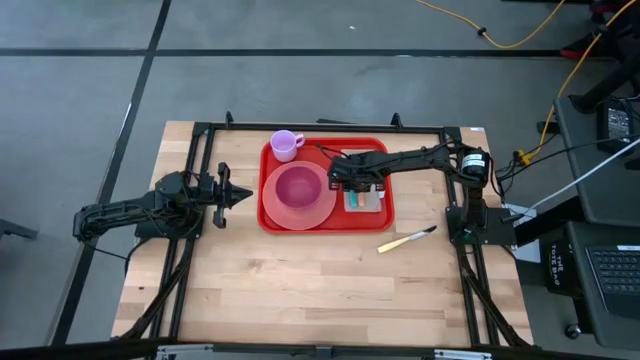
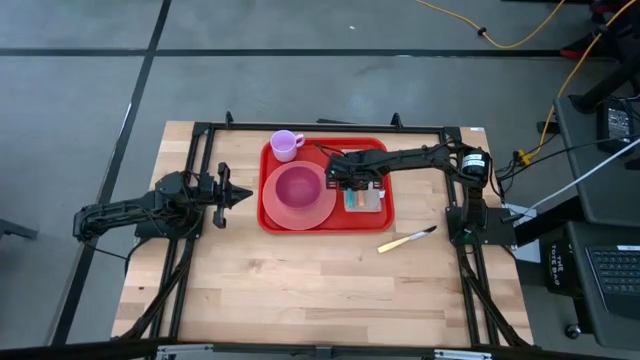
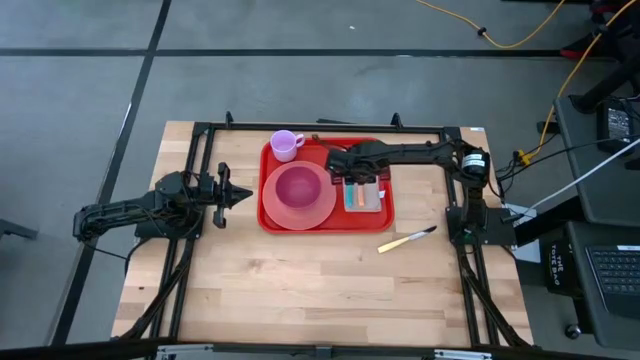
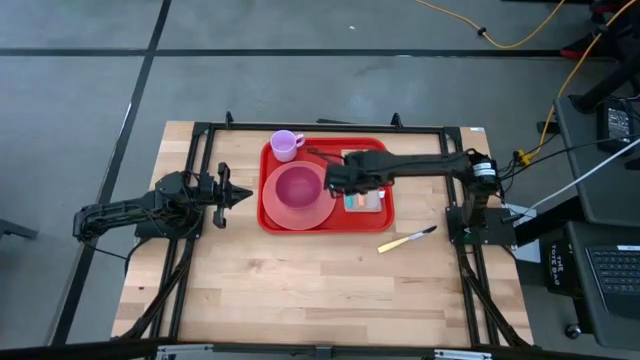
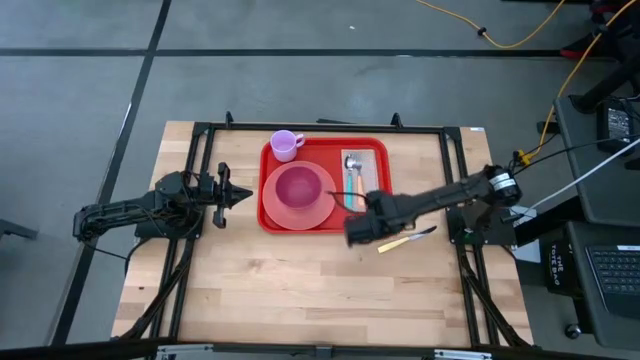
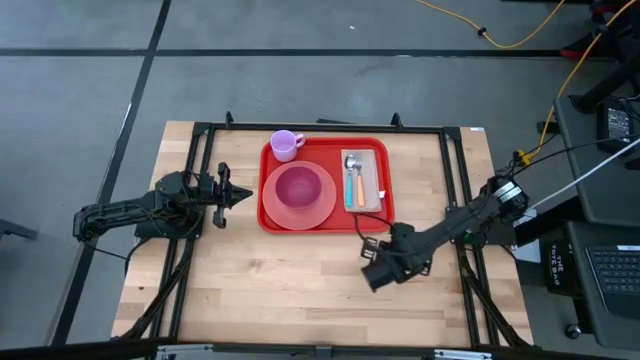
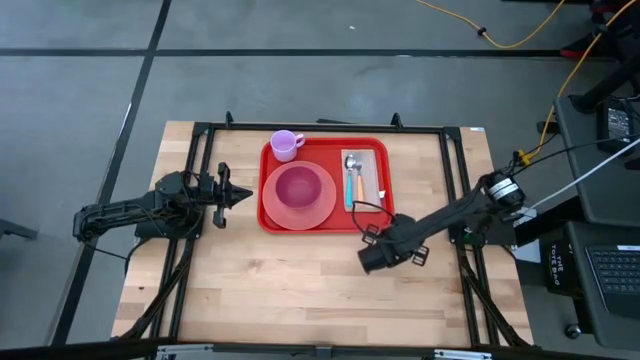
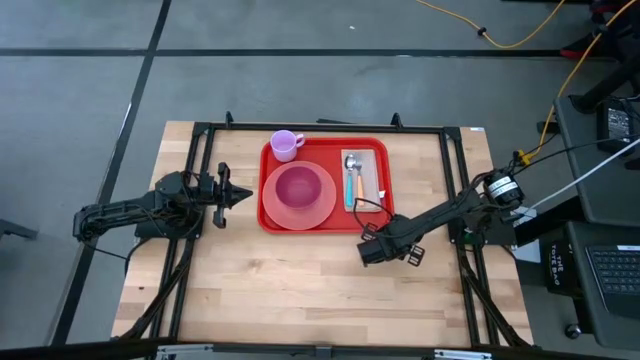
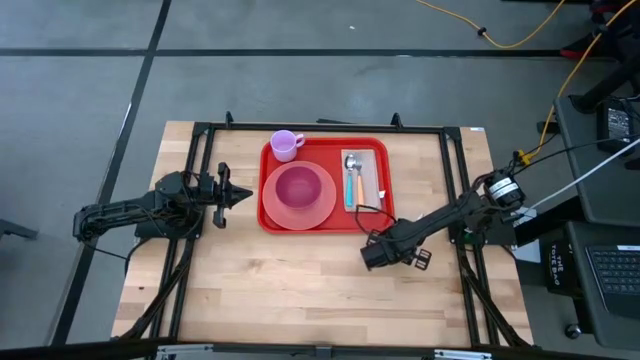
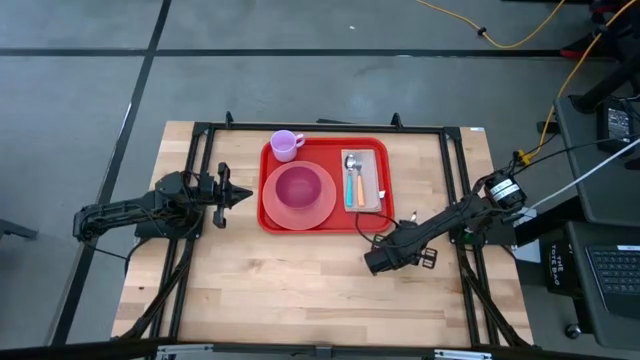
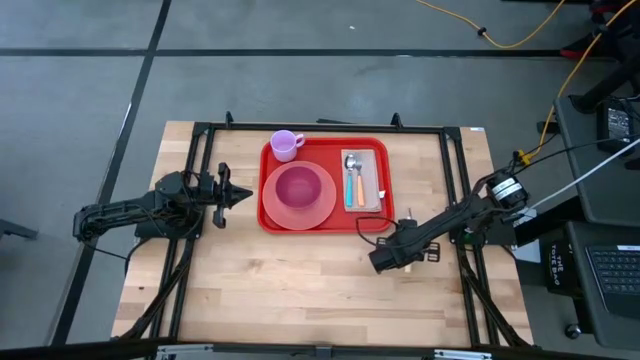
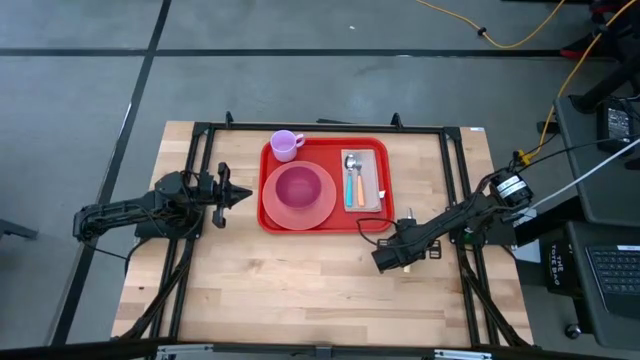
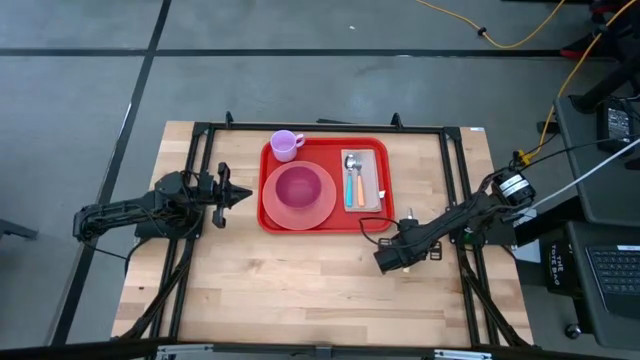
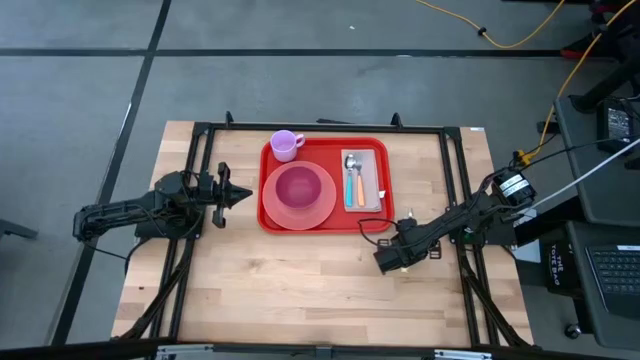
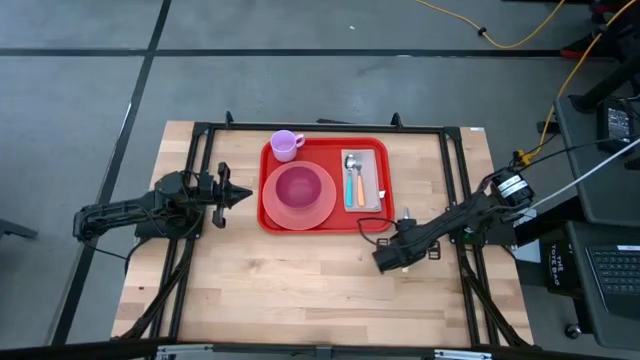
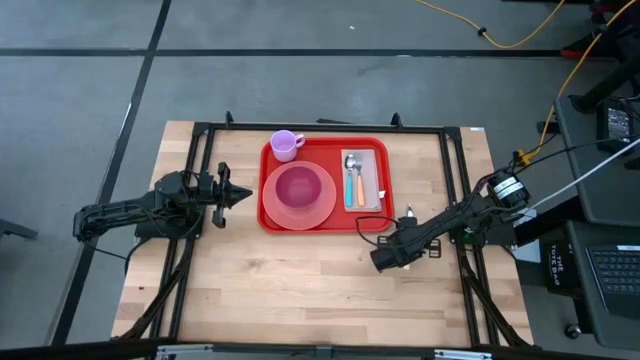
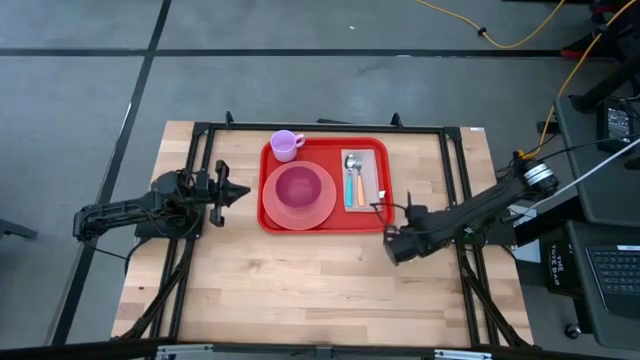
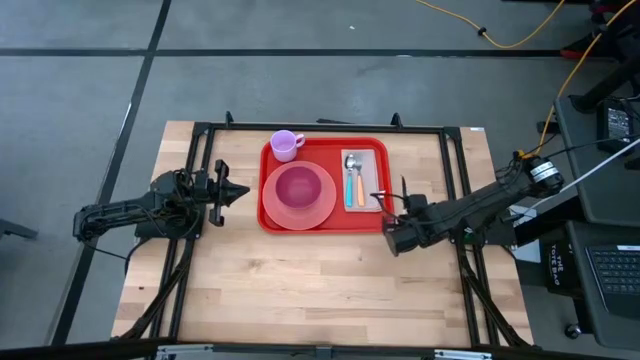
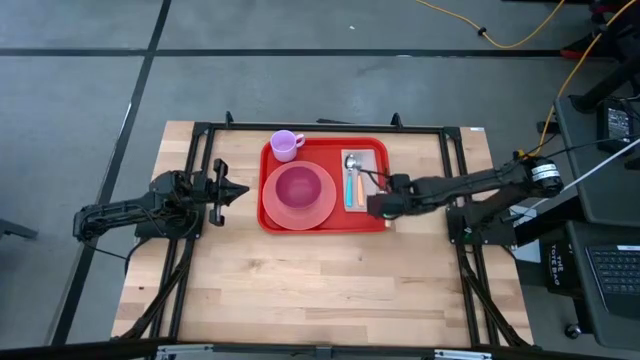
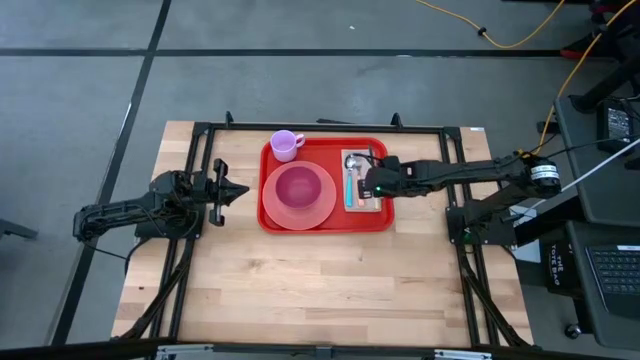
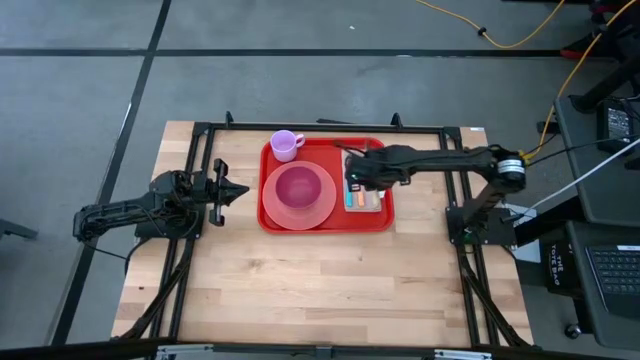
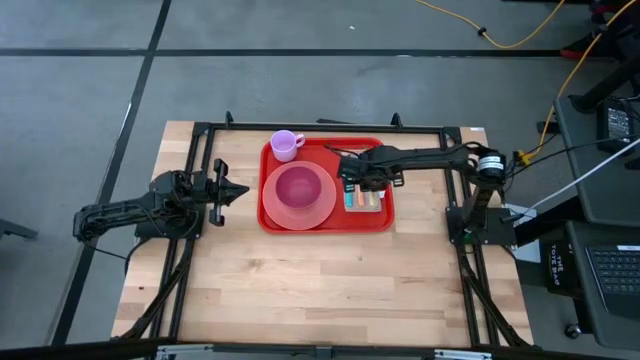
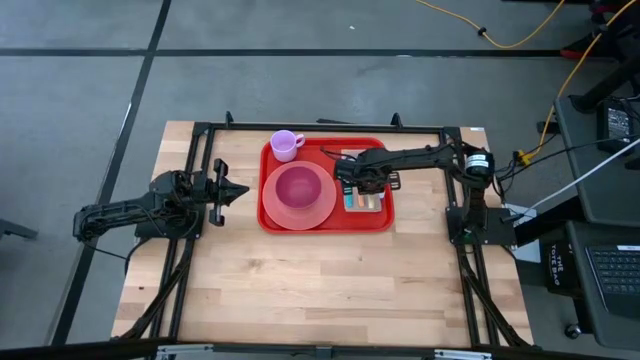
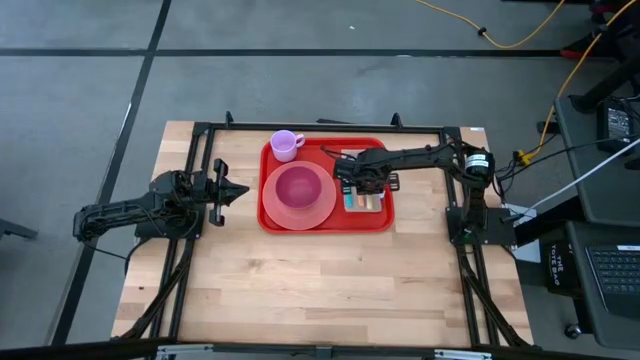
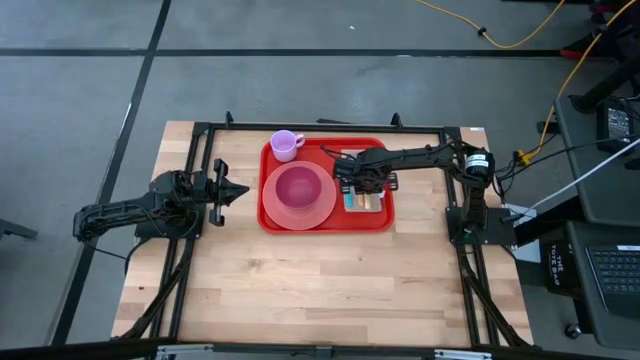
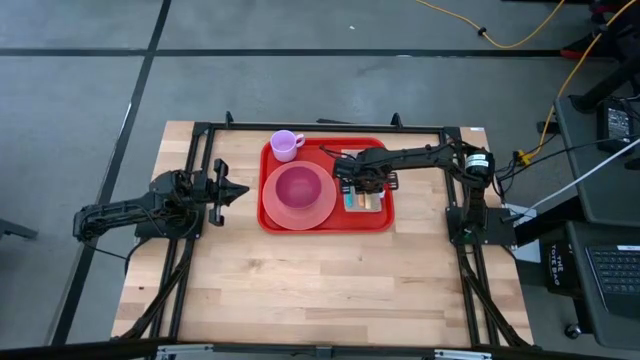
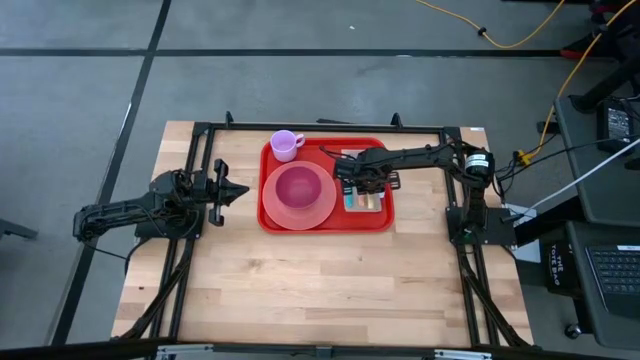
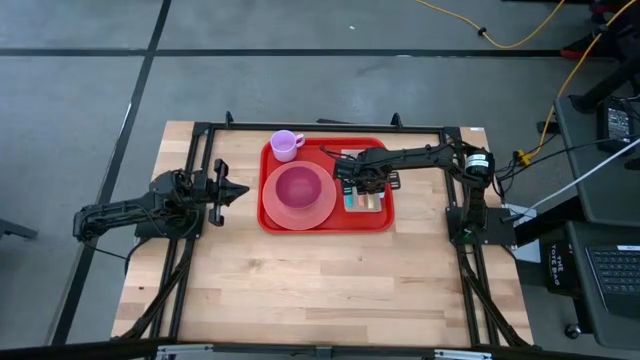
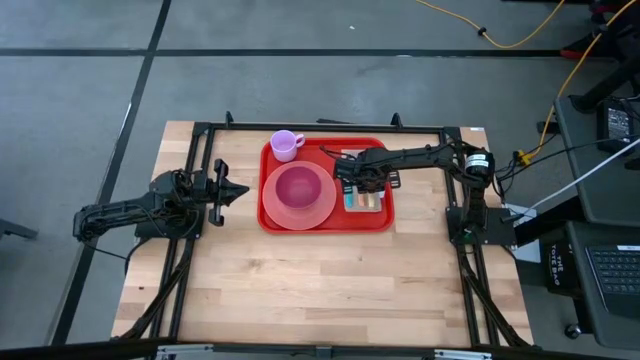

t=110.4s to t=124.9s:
Task: Set up tray
Put the yellow knife on top of the brown napkin on the right side of the orange fork

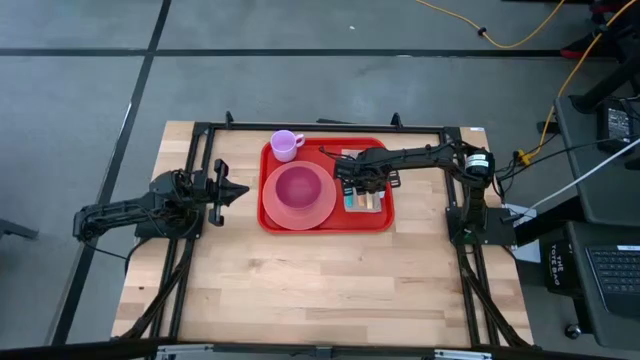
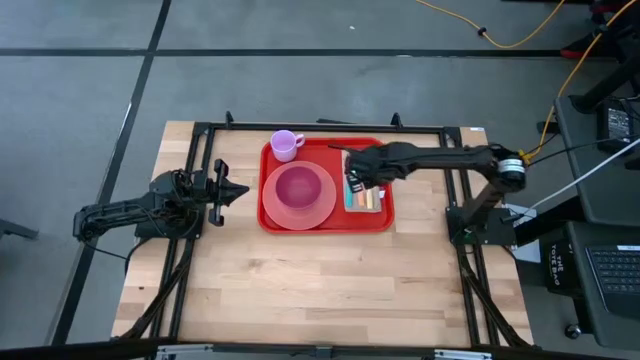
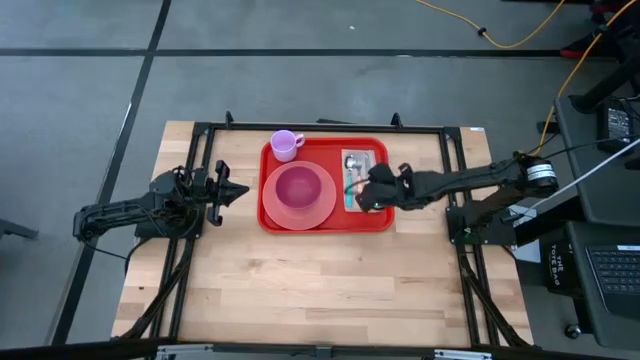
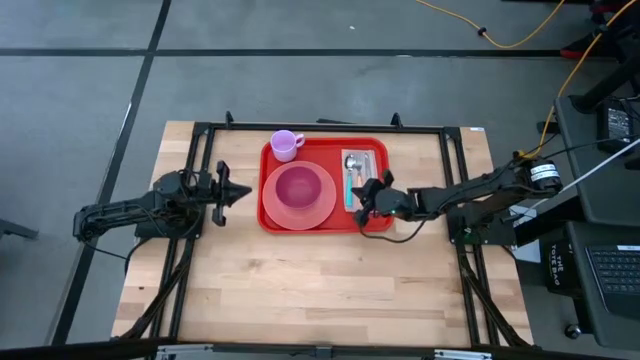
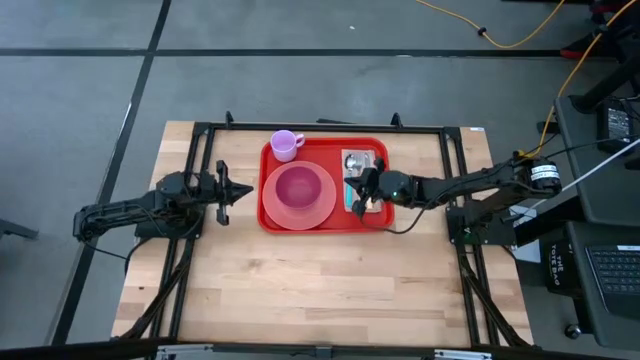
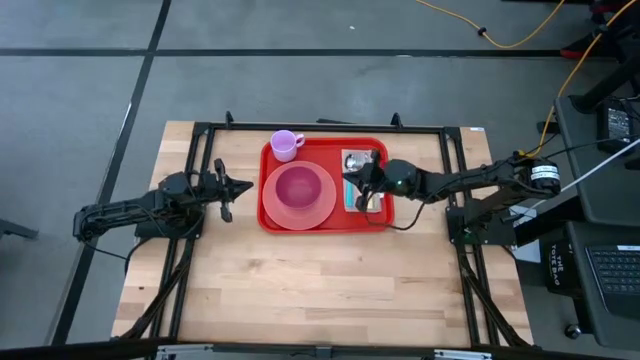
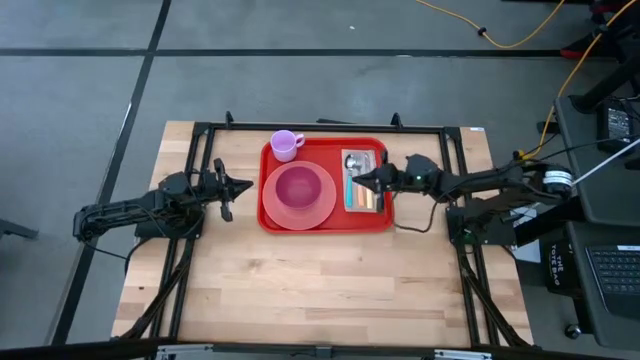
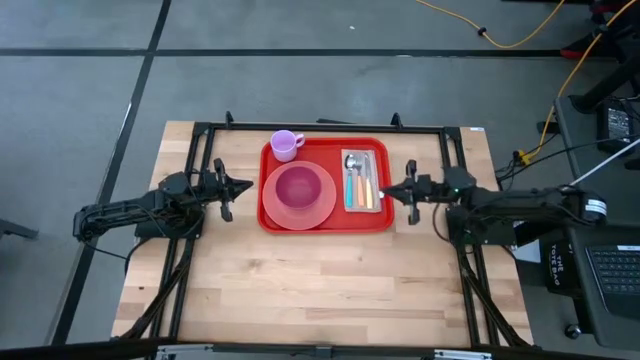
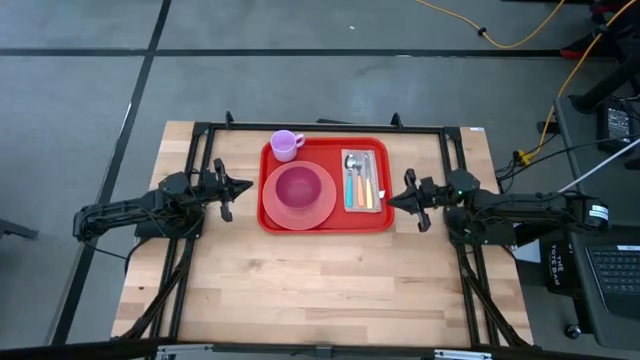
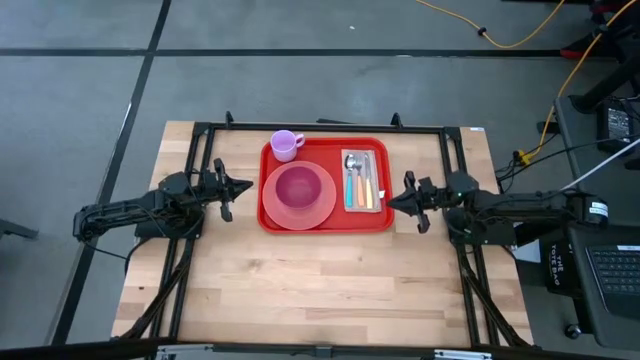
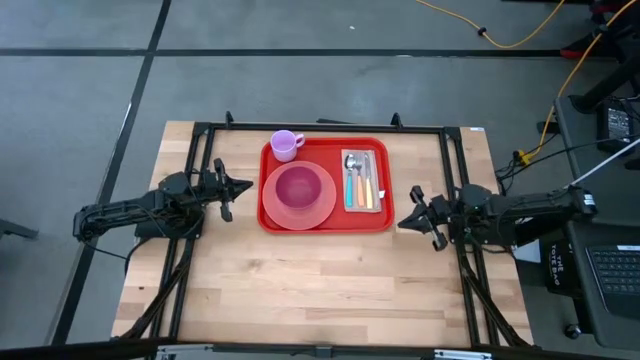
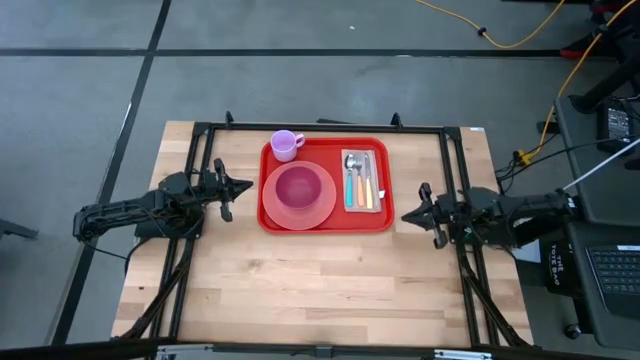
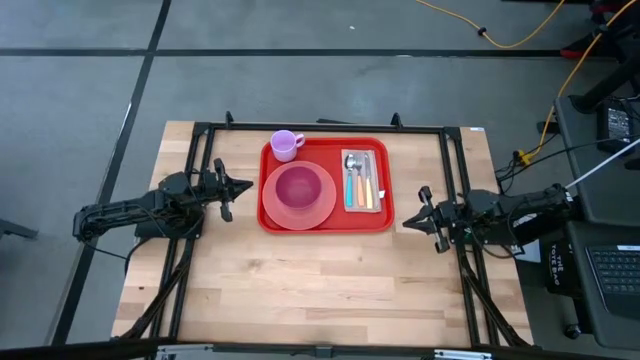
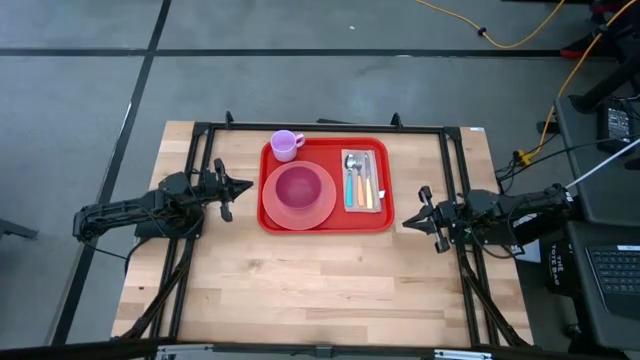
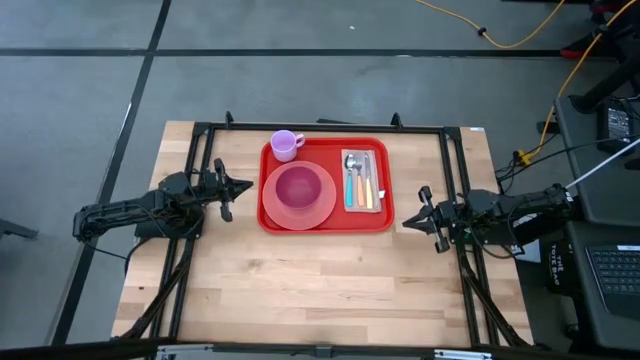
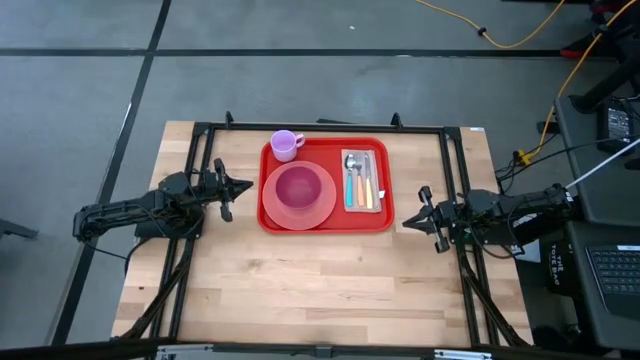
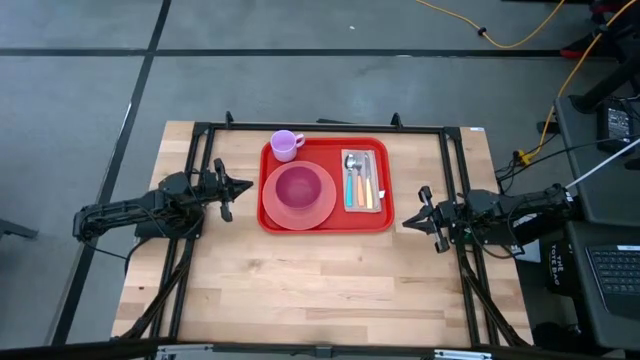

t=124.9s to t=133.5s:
Return to Home Position
